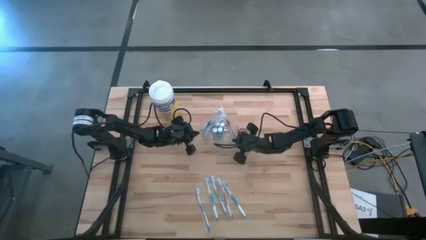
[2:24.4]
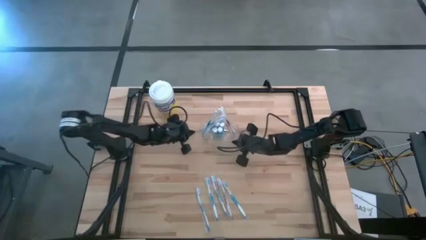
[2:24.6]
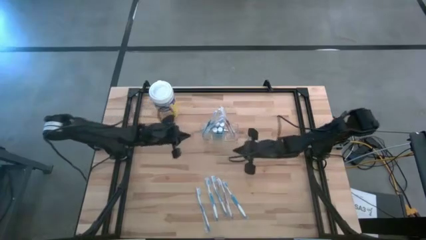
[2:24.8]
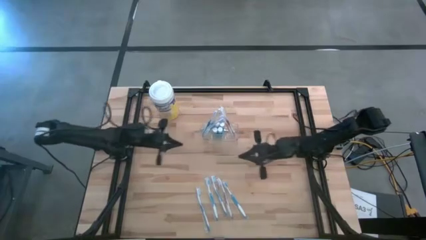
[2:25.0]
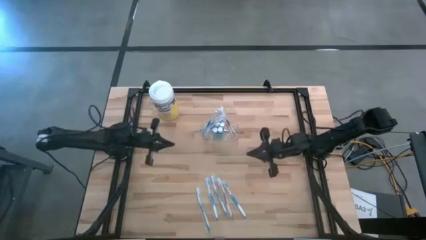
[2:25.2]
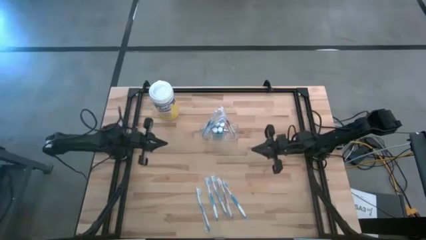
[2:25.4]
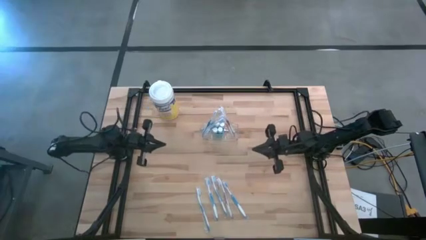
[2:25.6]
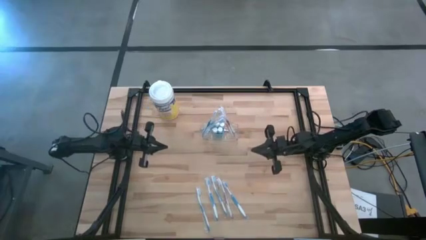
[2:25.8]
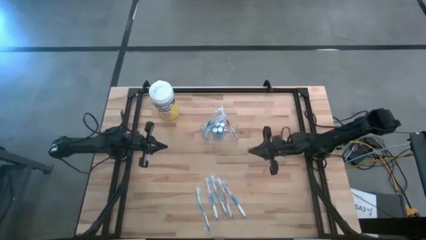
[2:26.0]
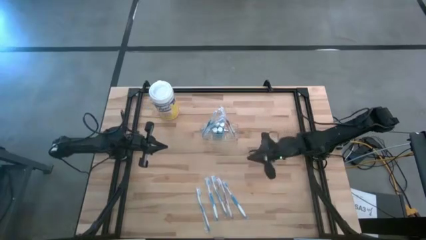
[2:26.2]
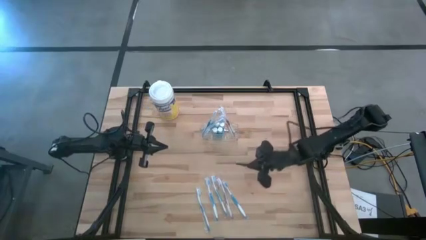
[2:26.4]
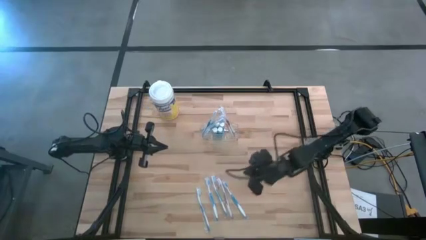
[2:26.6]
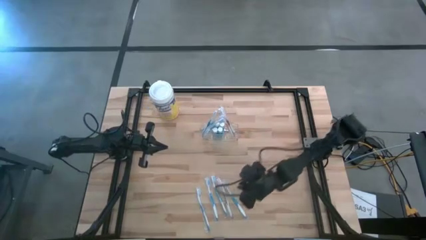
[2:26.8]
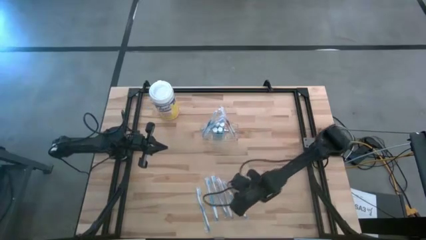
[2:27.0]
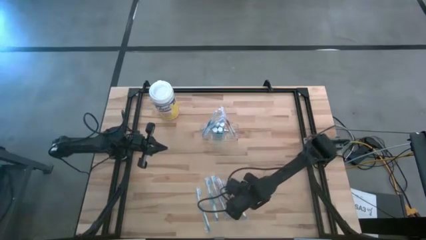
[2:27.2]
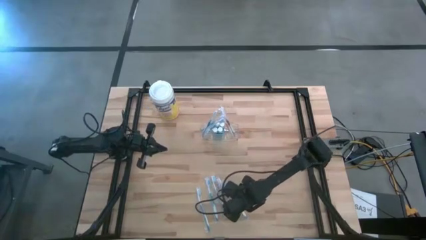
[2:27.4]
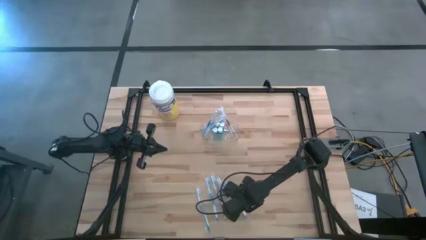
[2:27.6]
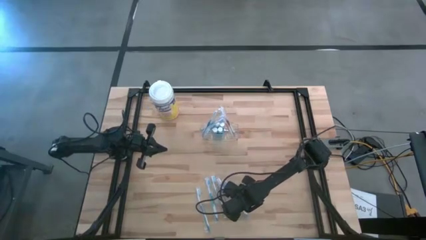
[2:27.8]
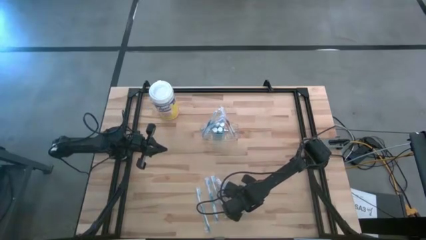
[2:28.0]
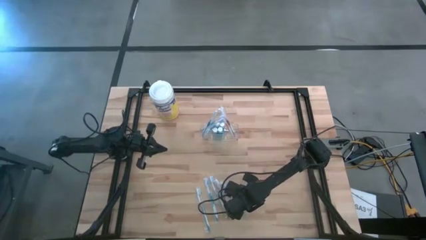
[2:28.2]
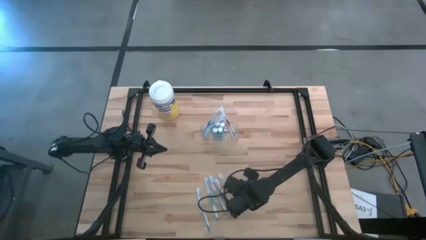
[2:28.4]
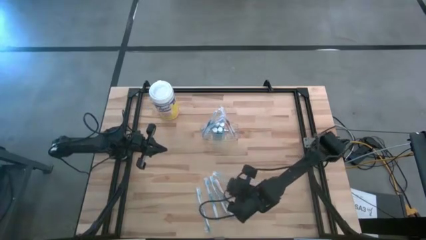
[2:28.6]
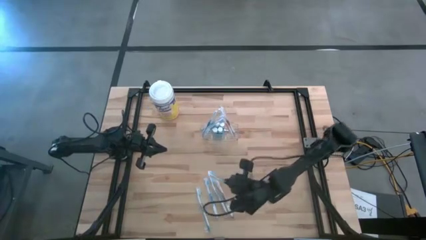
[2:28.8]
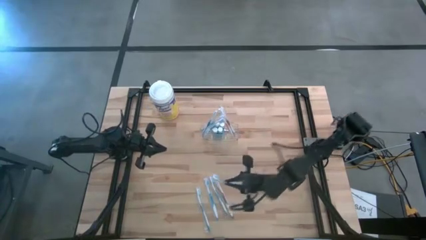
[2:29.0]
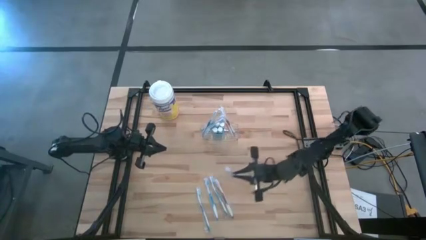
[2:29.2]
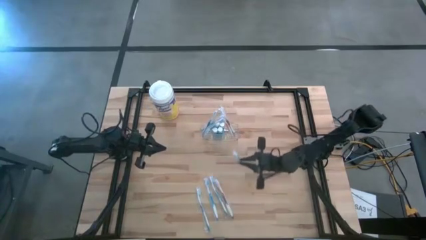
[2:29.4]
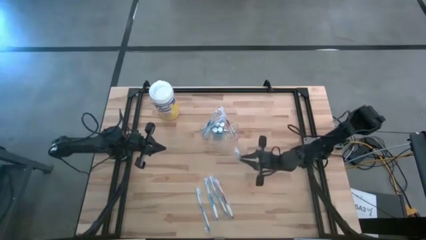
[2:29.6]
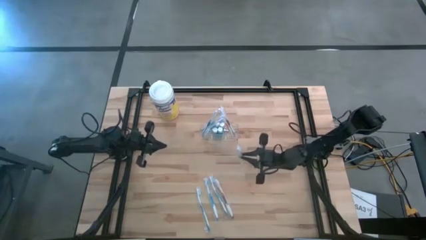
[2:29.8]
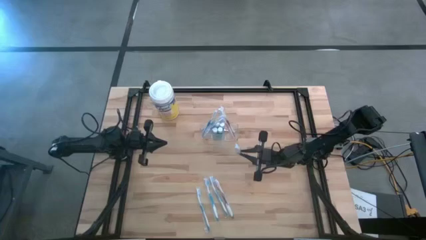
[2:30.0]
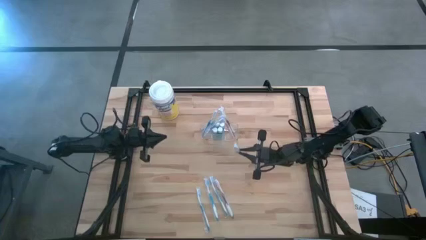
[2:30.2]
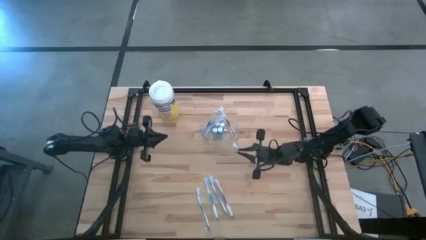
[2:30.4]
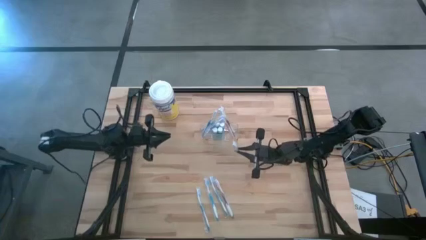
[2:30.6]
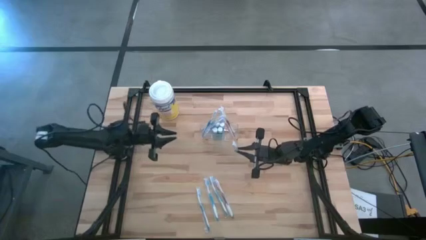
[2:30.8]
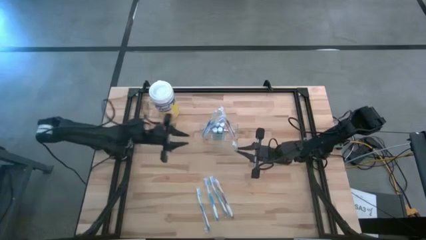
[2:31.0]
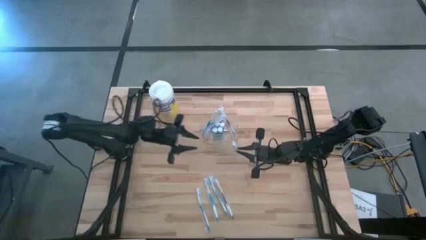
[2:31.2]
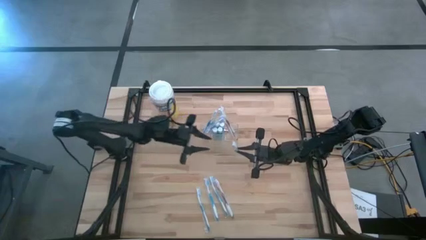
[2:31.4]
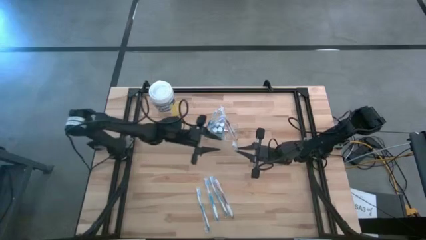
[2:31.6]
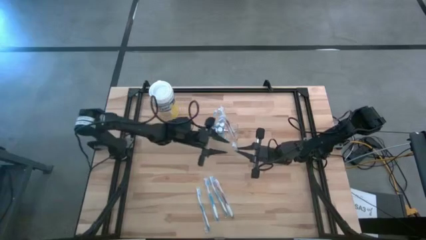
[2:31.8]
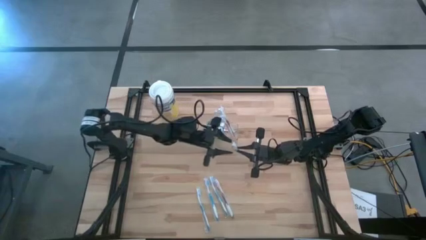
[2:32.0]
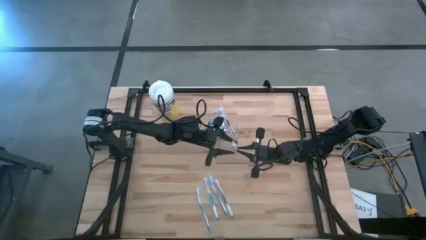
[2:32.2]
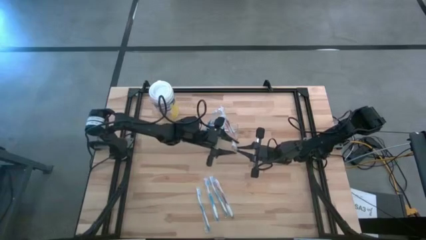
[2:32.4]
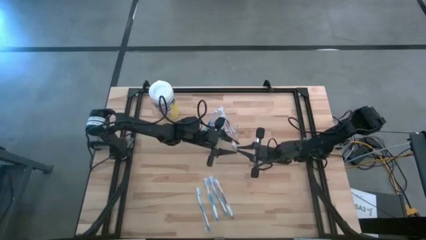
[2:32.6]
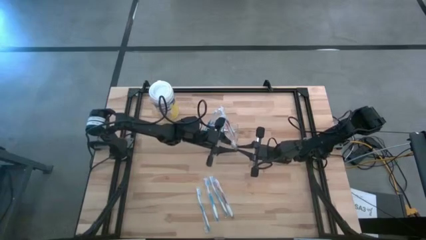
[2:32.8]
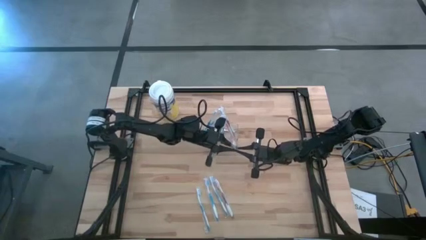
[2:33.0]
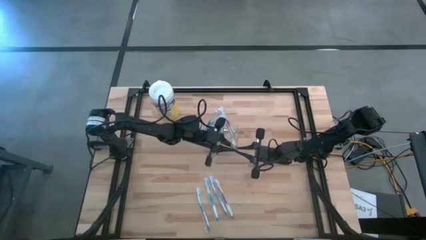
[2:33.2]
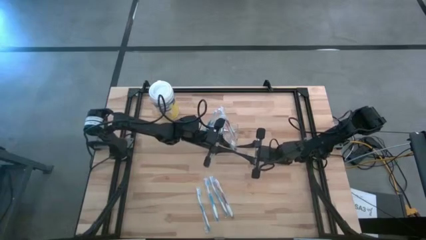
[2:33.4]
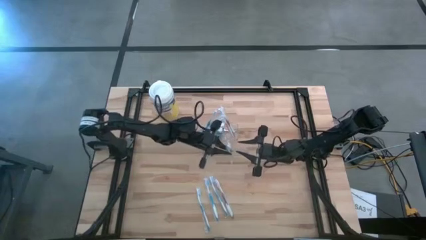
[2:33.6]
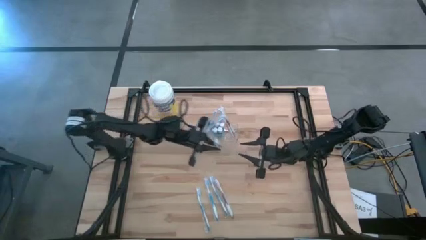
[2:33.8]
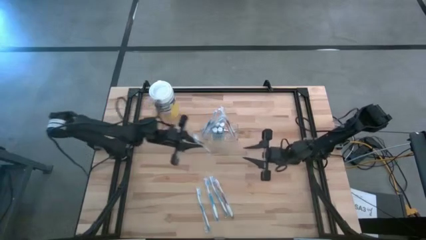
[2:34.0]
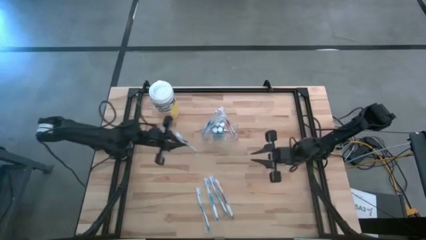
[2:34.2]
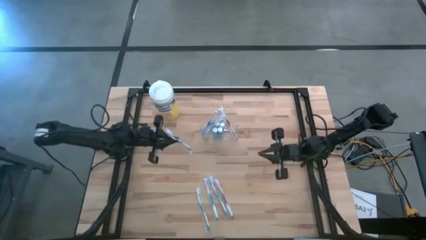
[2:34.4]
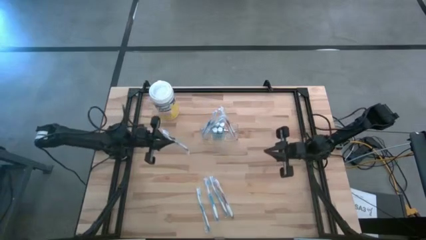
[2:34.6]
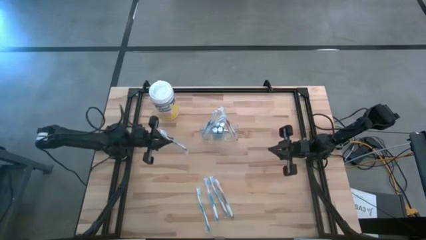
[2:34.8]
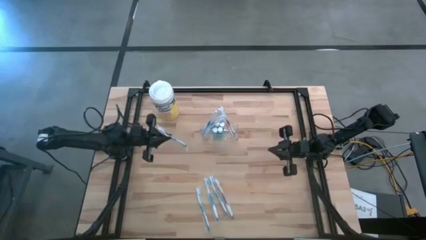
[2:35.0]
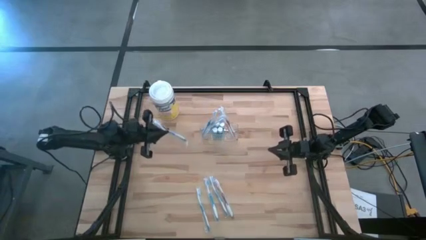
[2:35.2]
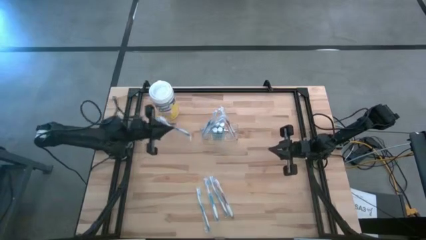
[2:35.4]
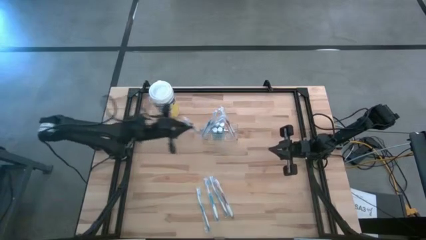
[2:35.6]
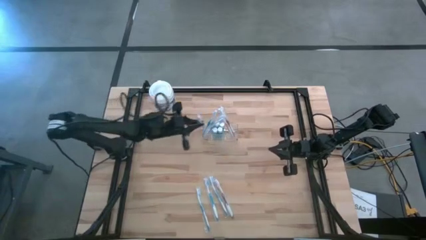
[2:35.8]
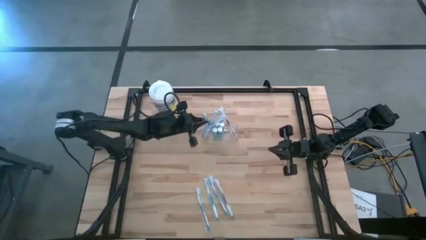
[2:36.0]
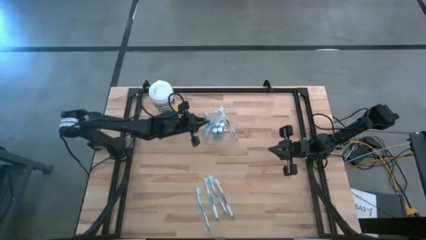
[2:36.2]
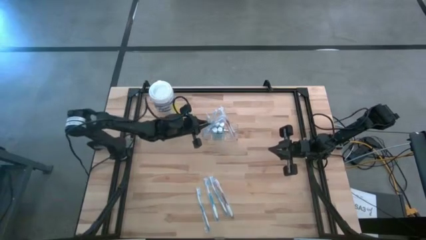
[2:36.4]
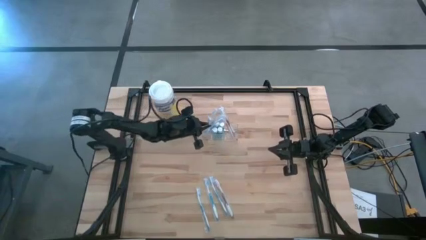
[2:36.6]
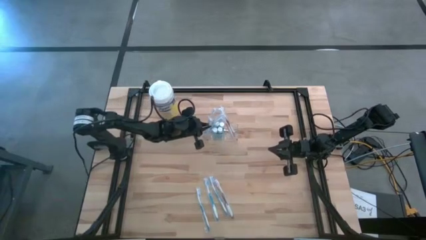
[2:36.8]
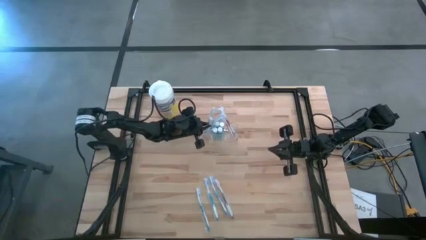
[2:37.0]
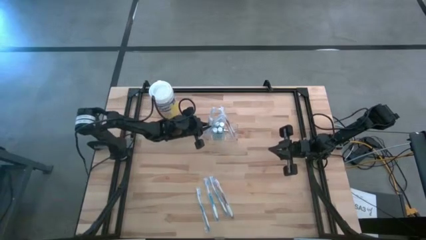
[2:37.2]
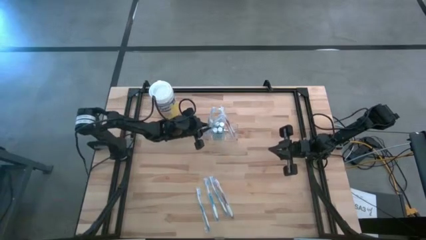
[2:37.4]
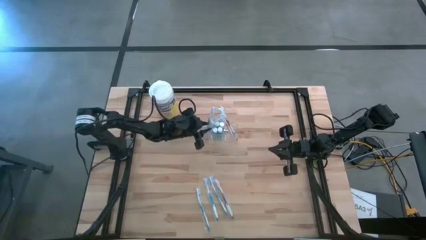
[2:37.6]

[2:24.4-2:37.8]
Task: Pick & Place toothbrushing station
Put the blue toothbrush into the left section of the transparent organizer
